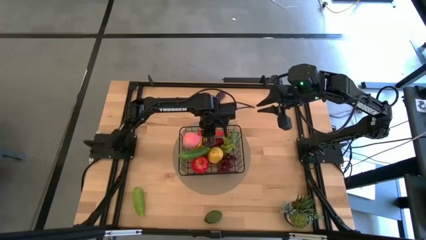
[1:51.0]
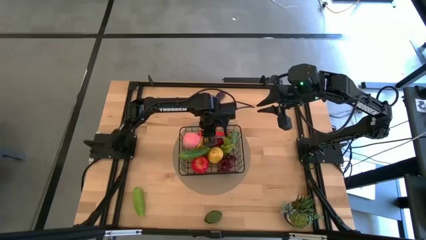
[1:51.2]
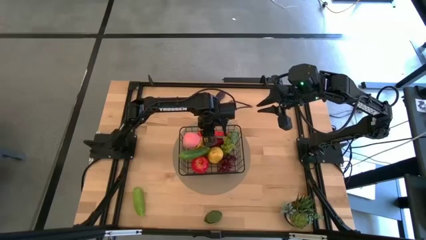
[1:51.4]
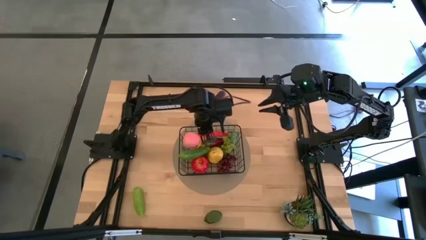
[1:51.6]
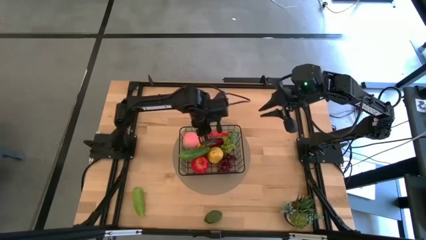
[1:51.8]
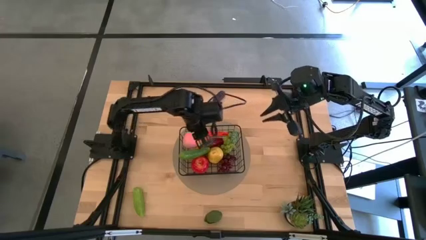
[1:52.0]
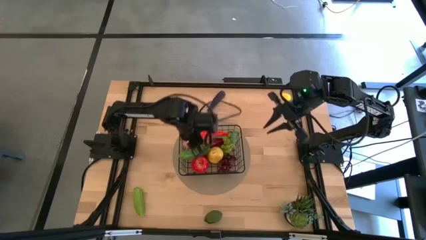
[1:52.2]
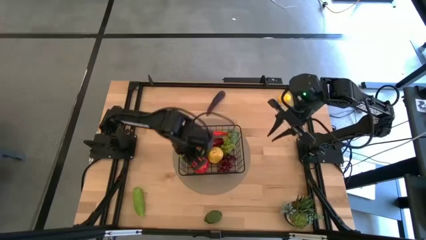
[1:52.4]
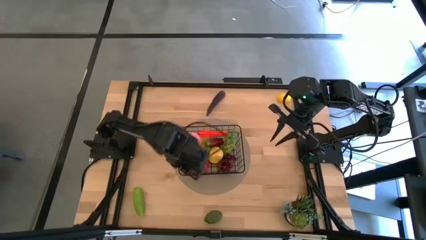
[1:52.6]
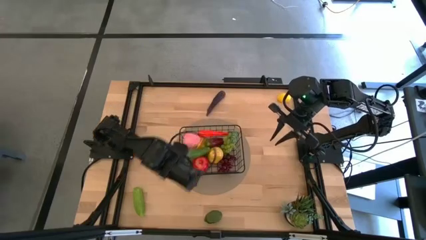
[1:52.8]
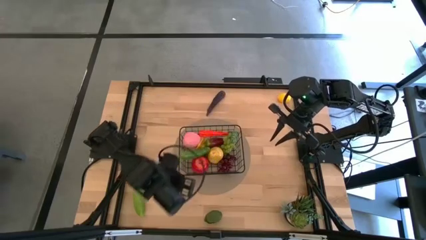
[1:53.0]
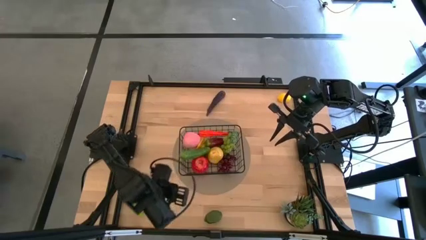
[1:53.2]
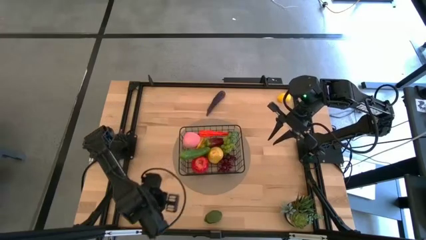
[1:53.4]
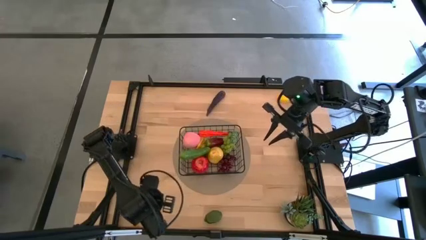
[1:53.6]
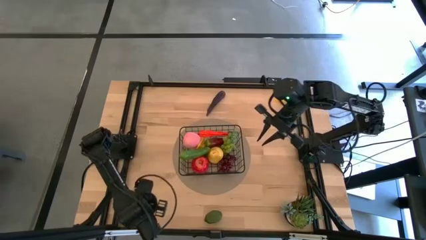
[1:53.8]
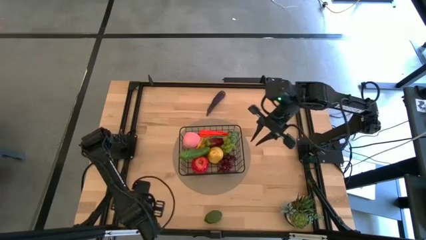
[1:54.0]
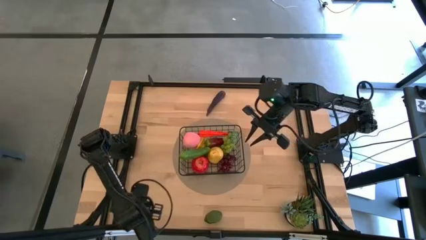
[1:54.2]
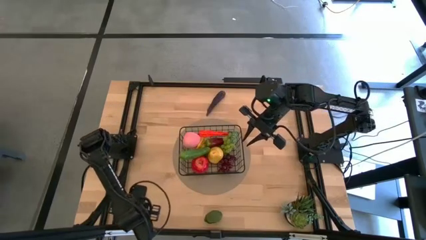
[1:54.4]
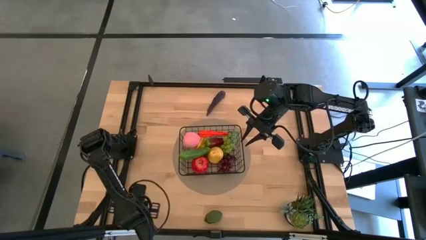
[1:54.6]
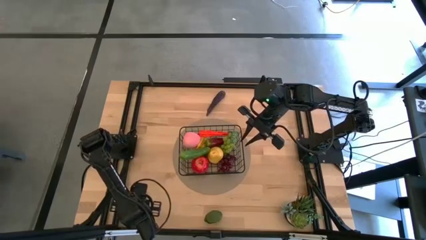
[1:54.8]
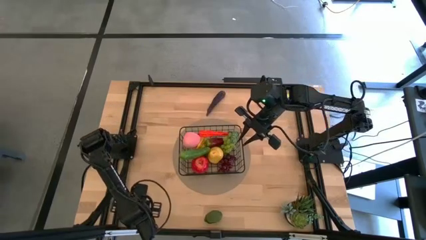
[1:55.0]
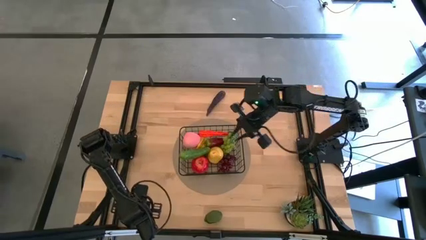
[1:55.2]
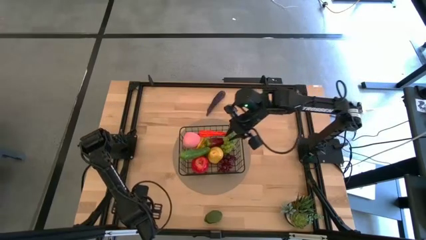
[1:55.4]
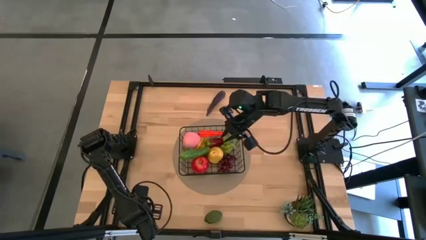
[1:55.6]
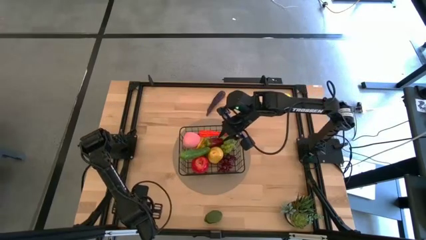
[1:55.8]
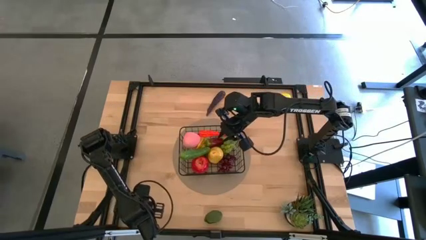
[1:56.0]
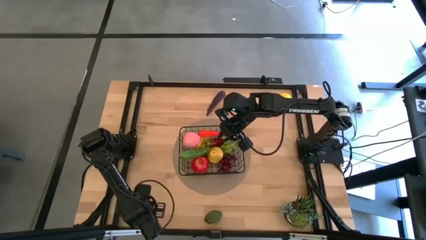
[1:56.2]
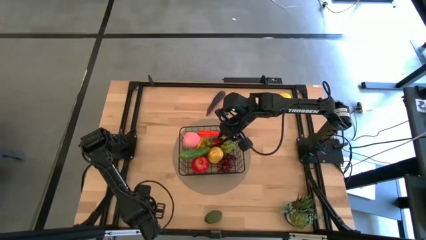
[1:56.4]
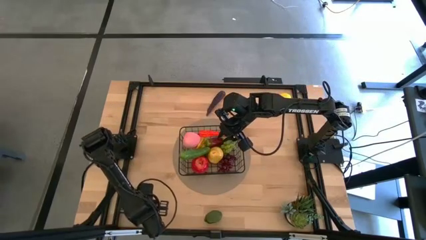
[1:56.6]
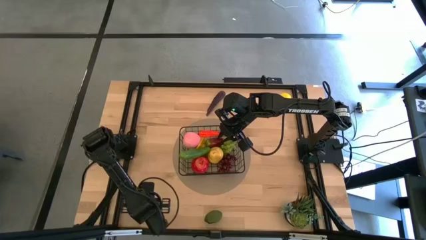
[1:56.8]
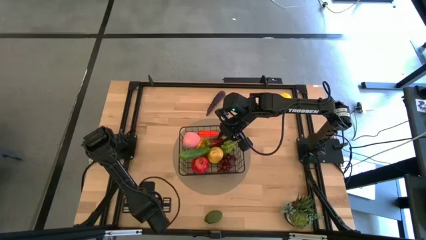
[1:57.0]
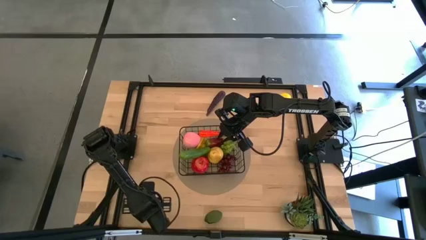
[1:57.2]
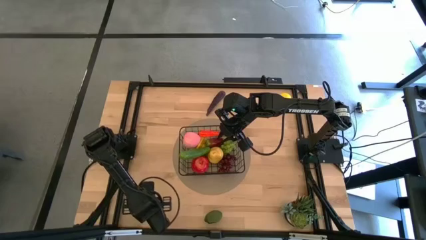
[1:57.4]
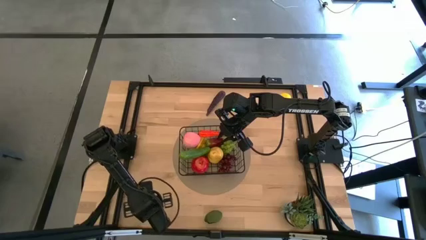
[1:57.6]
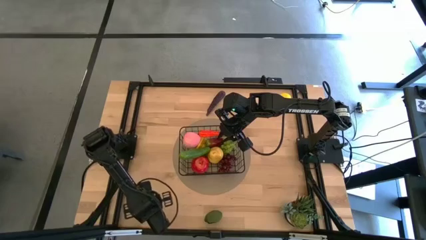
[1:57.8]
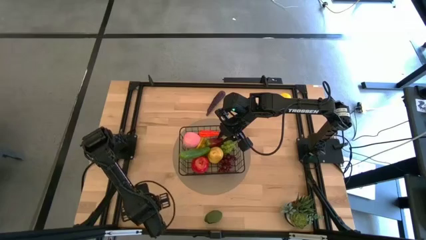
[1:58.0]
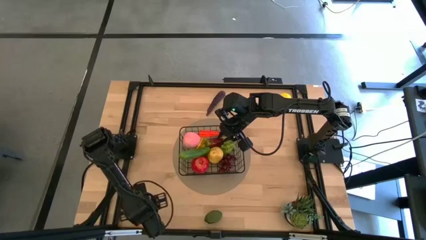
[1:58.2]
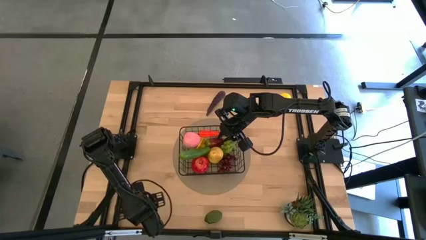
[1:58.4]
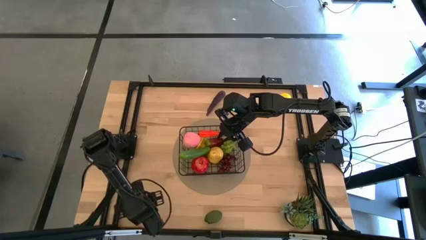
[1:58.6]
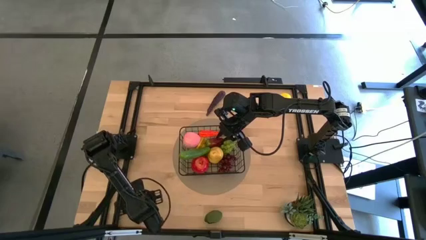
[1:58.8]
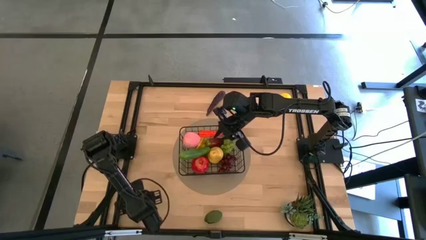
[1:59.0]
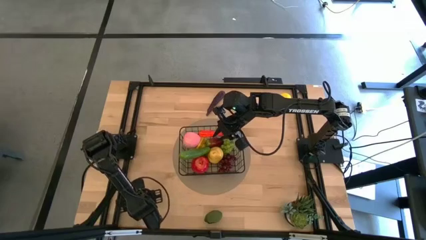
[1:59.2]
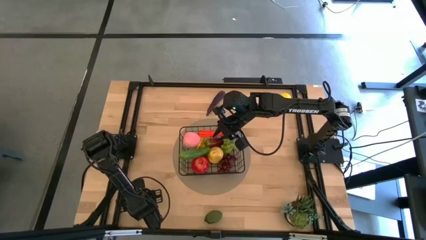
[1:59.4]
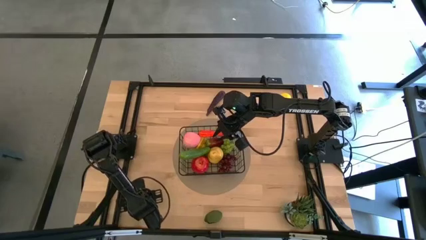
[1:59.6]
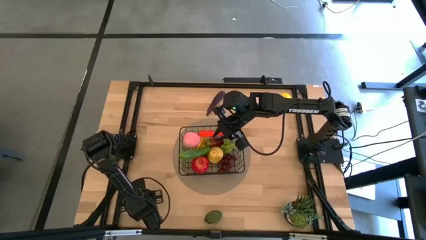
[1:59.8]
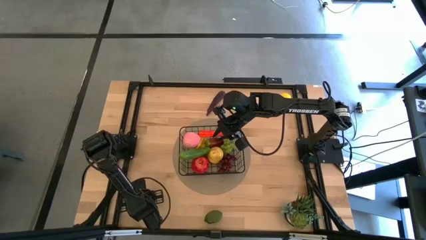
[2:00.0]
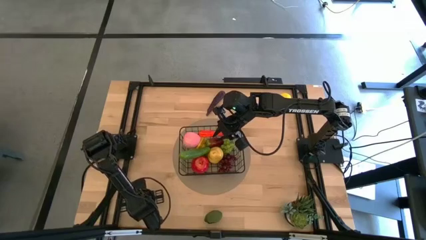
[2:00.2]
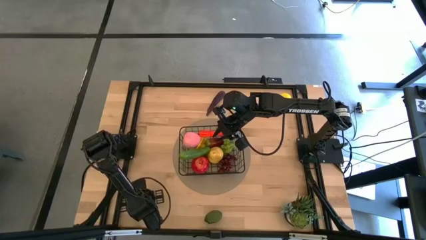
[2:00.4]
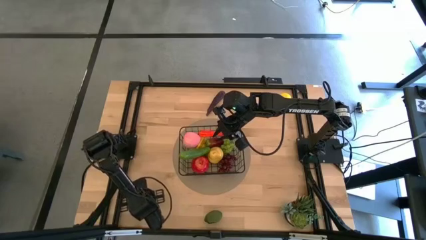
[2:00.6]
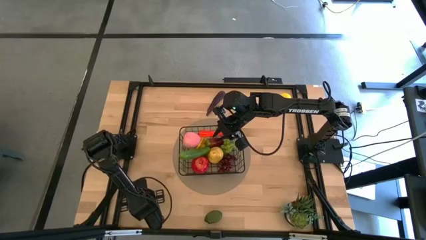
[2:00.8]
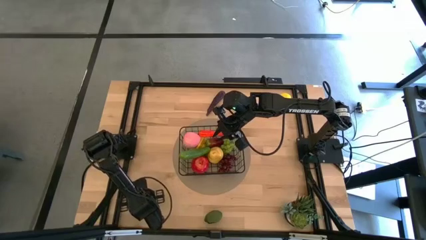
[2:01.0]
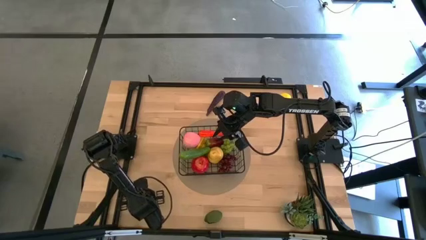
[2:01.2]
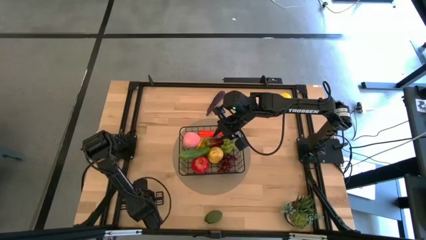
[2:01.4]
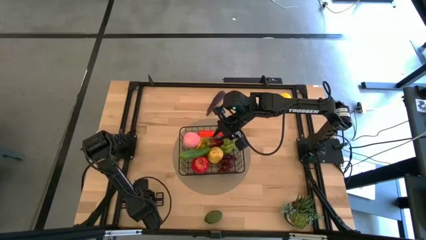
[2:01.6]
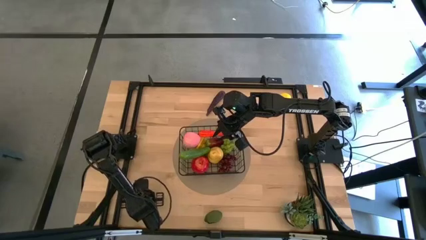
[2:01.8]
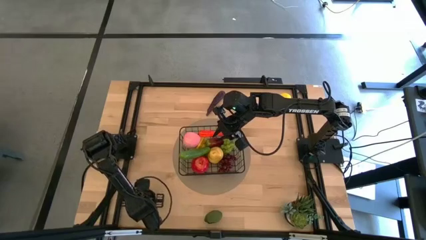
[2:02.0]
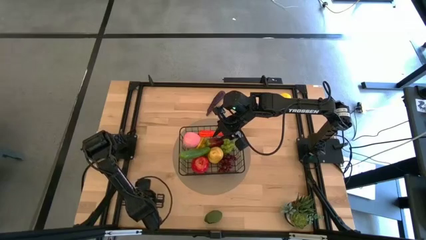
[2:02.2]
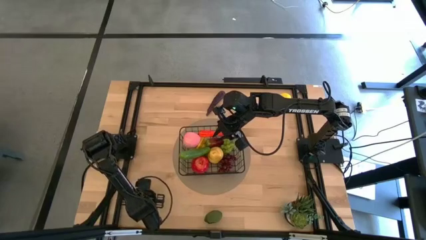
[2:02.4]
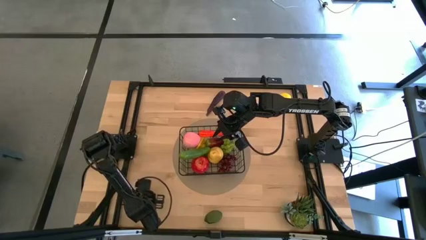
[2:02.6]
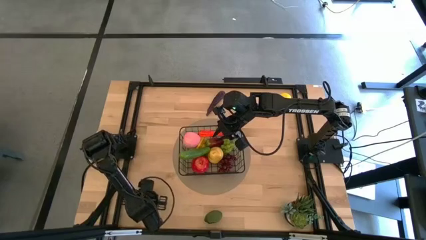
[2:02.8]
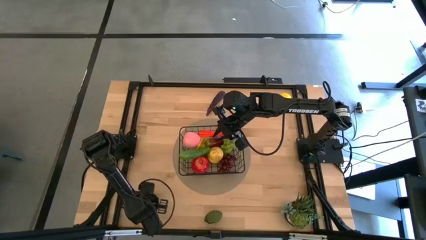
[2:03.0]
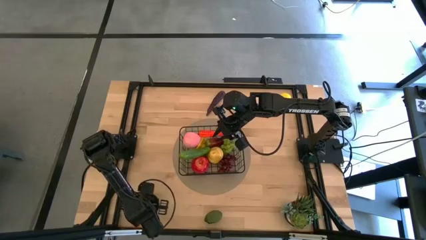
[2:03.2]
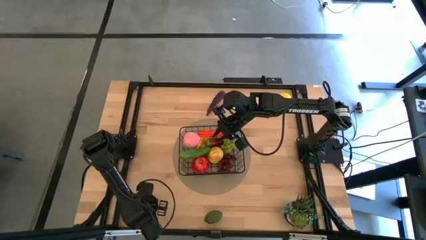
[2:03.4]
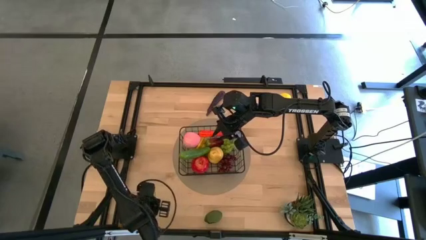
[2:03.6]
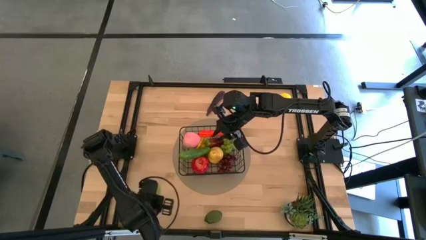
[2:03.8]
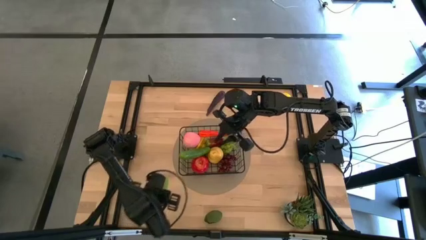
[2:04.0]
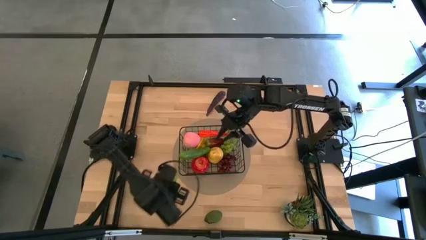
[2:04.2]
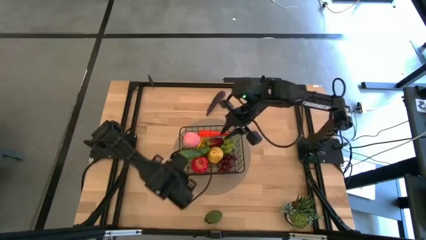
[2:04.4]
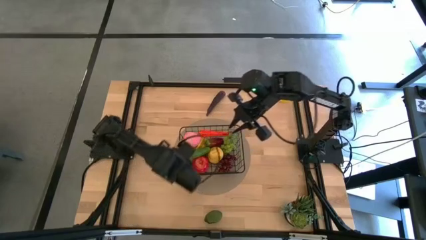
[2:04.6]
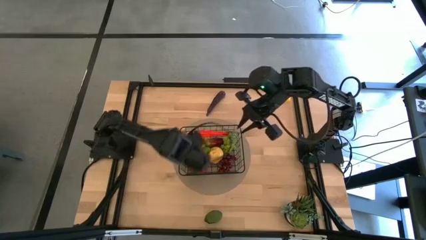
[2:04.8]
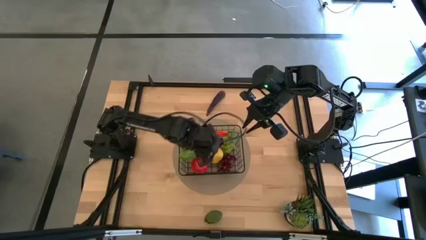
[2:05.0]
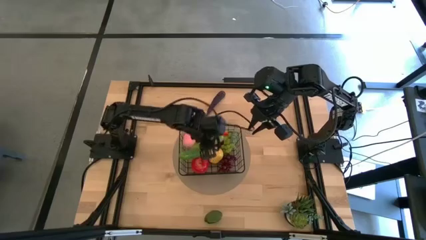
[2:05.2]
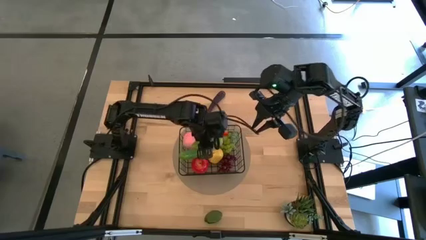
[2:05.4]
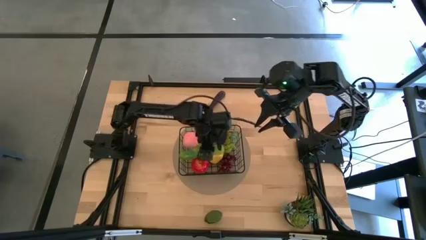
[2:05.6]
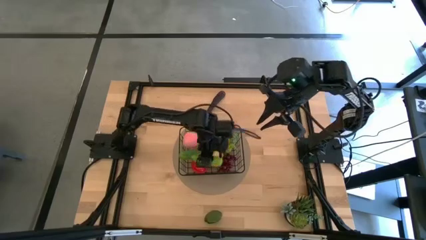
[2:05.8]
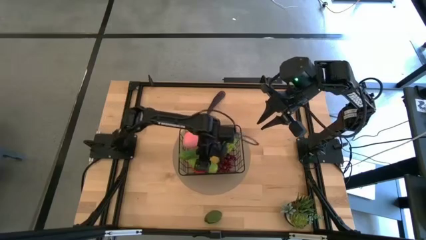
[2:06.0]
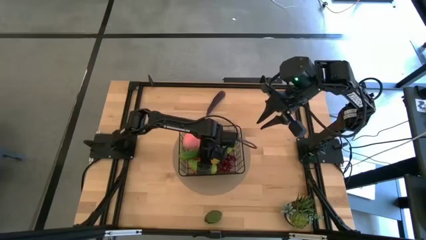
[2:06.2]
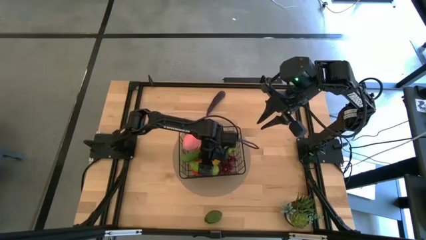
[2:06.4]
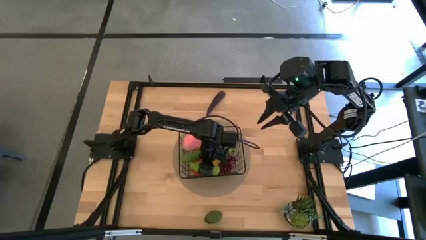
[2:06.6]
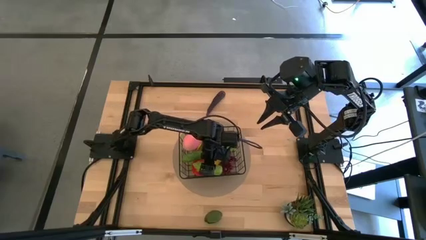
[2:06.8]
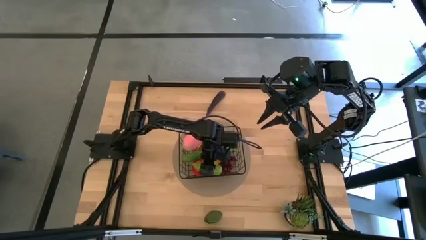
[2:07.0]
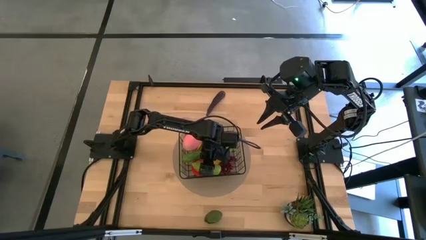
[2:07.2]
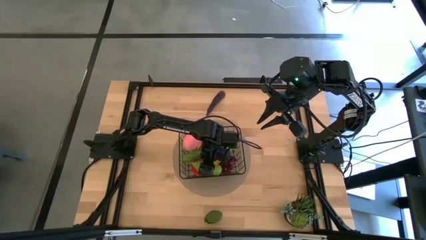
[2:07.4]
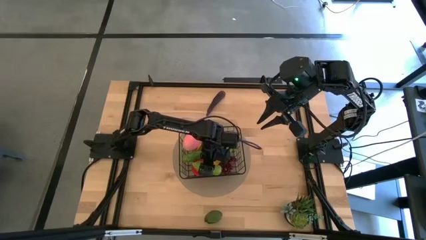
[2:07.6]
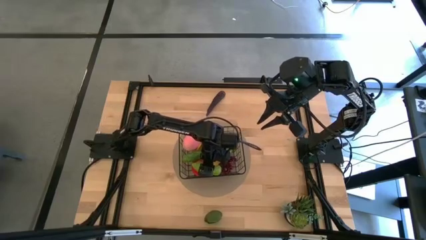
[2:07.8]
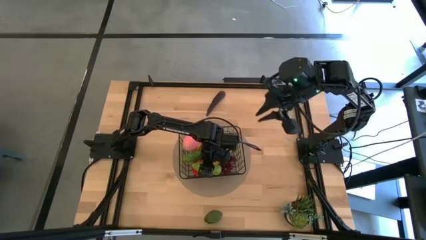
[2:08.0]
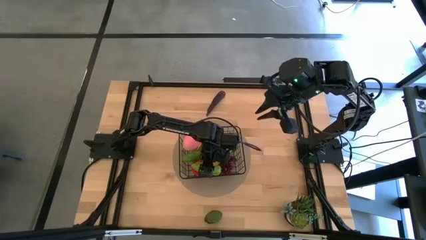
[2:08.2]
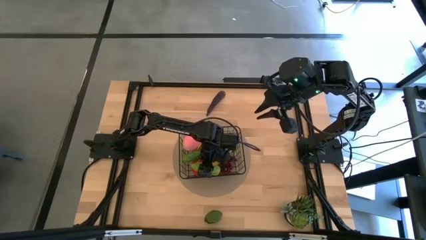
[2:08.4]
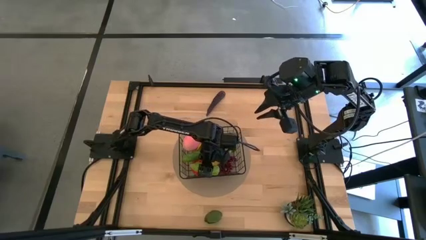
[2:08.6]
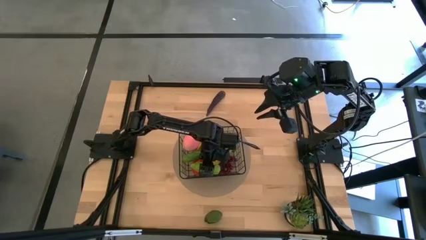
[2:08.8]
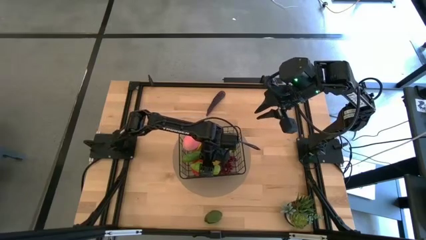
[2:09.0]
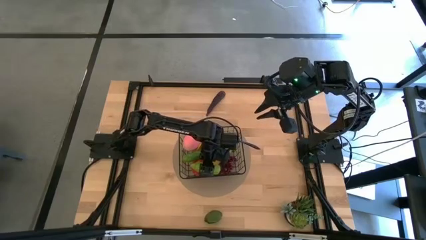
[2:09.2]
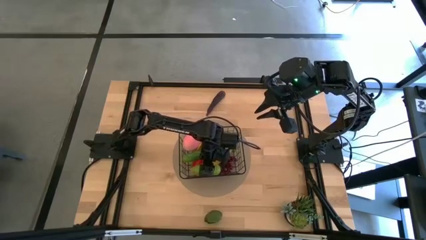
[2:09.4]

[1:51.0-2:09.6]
Task: Build produce basket
Put the green cucumber into the black wire basket
